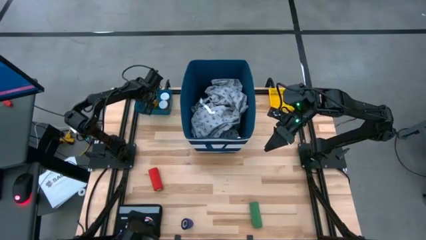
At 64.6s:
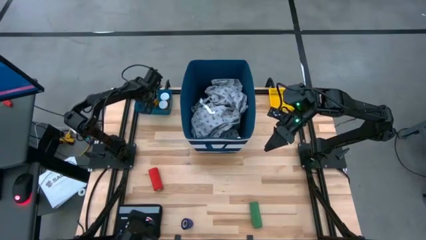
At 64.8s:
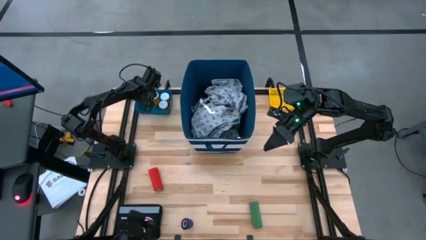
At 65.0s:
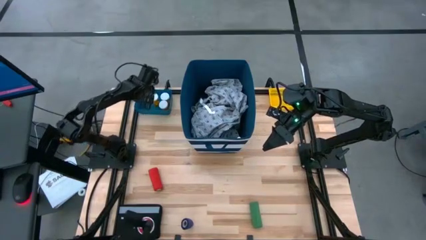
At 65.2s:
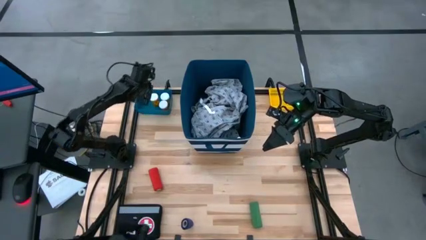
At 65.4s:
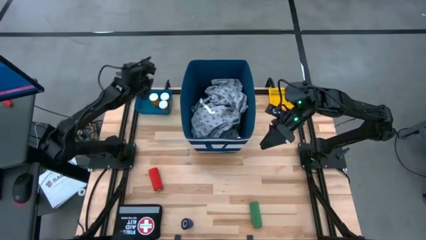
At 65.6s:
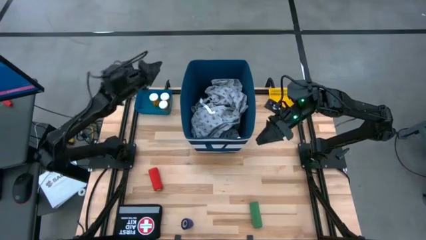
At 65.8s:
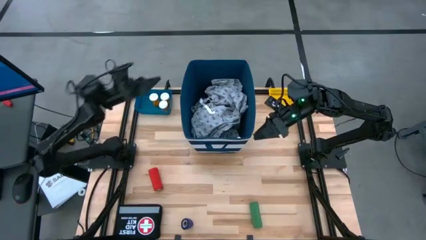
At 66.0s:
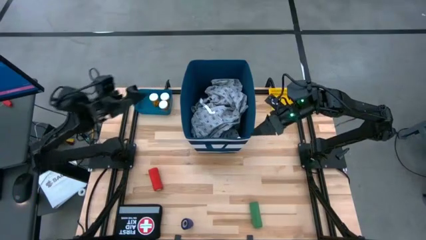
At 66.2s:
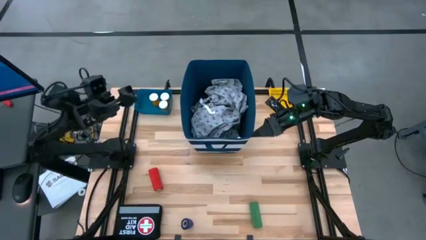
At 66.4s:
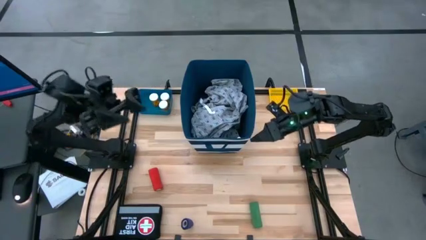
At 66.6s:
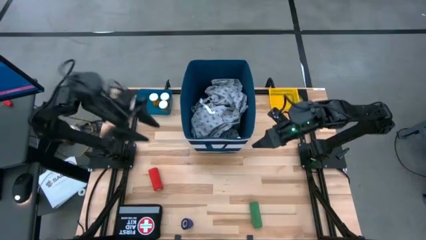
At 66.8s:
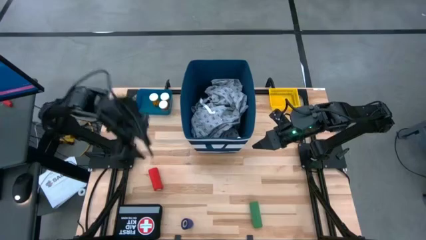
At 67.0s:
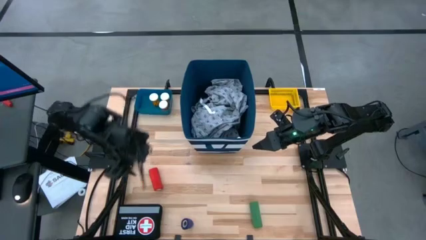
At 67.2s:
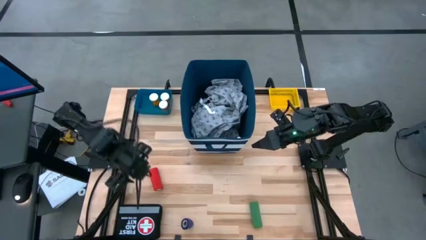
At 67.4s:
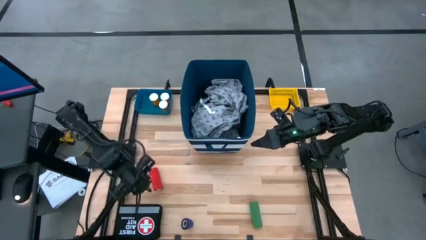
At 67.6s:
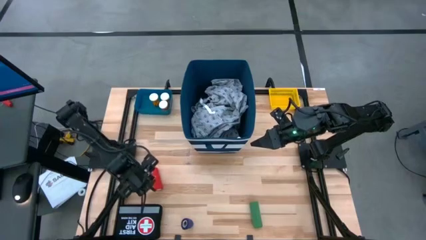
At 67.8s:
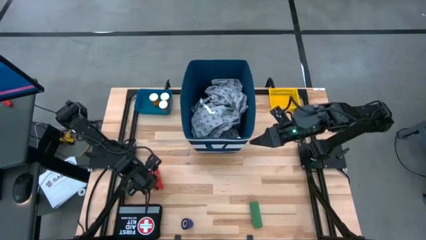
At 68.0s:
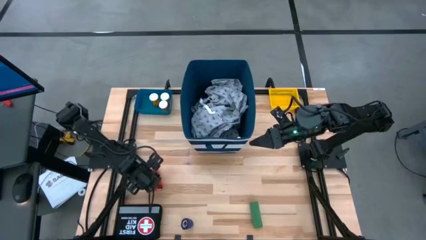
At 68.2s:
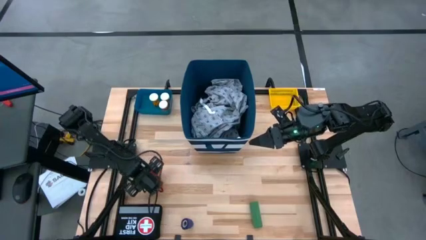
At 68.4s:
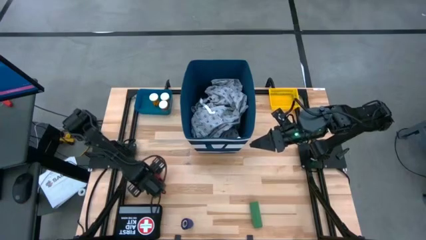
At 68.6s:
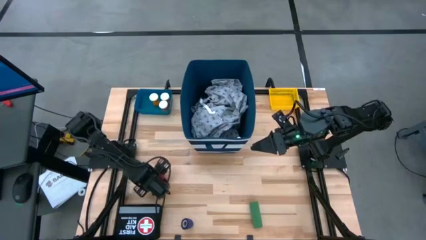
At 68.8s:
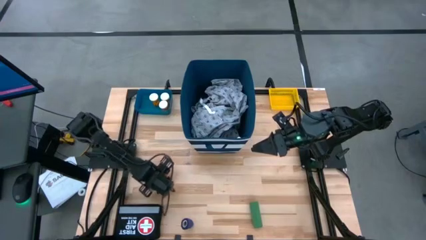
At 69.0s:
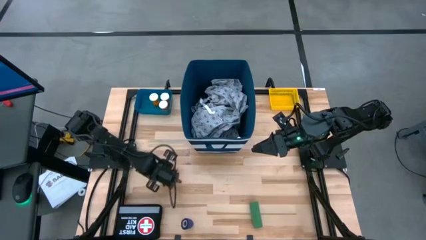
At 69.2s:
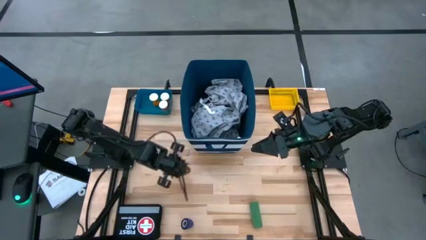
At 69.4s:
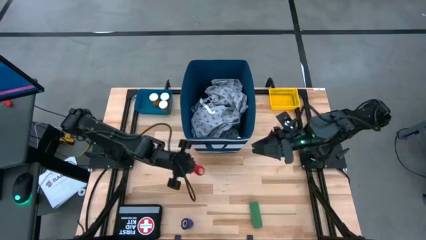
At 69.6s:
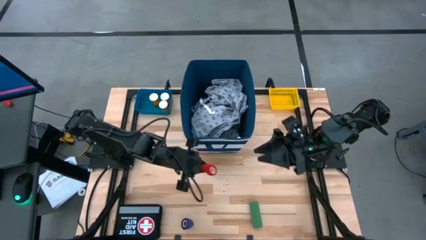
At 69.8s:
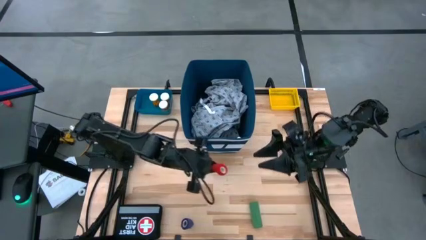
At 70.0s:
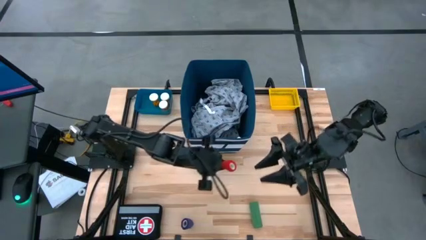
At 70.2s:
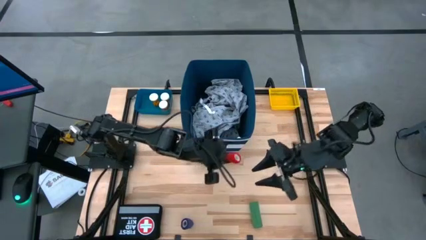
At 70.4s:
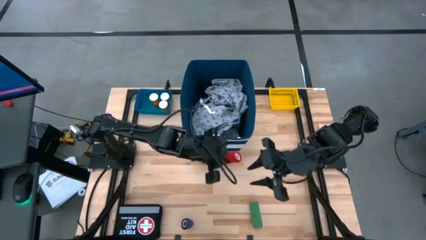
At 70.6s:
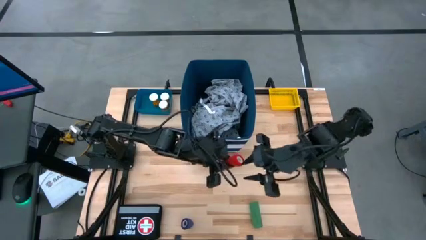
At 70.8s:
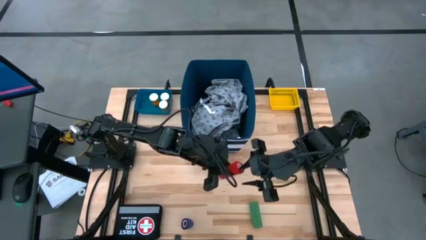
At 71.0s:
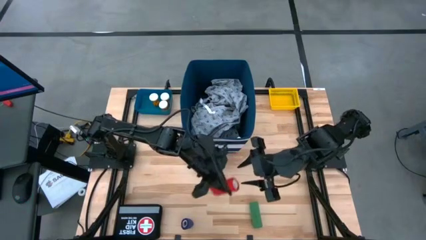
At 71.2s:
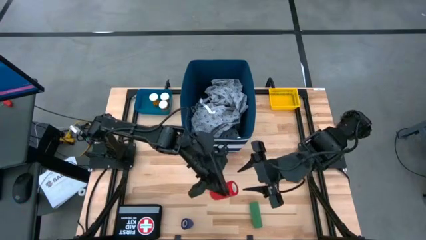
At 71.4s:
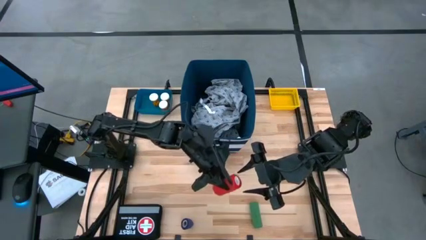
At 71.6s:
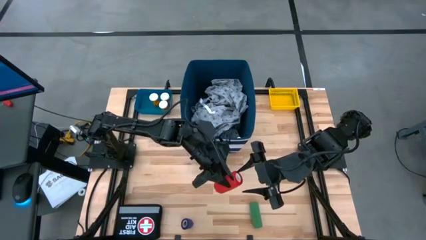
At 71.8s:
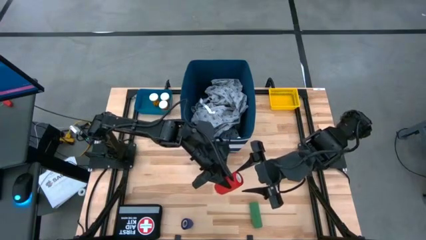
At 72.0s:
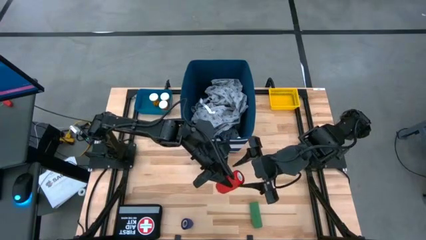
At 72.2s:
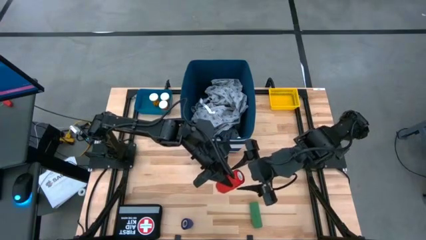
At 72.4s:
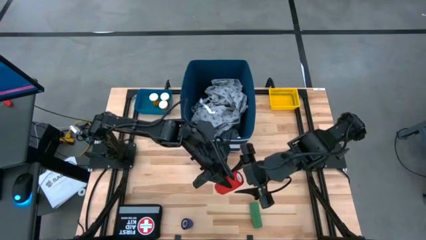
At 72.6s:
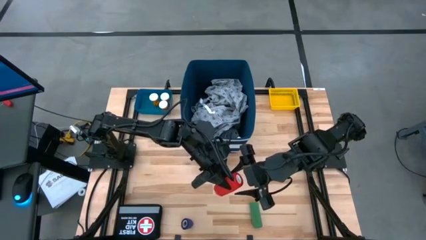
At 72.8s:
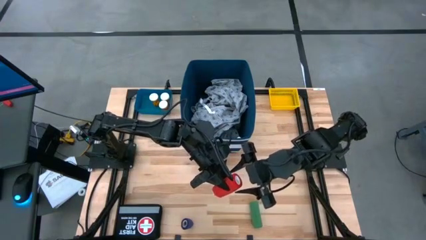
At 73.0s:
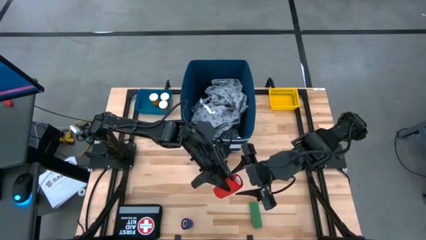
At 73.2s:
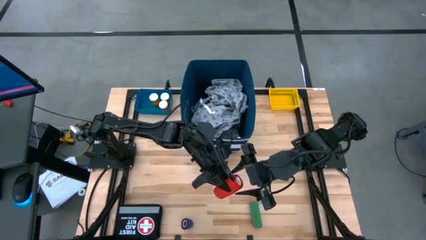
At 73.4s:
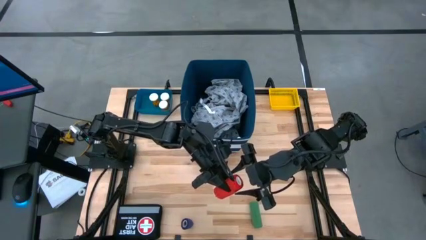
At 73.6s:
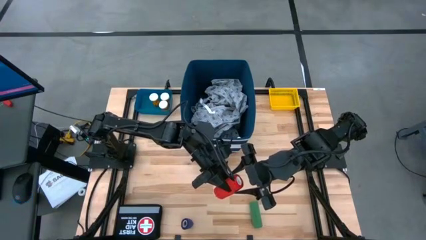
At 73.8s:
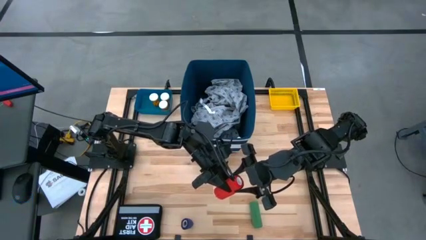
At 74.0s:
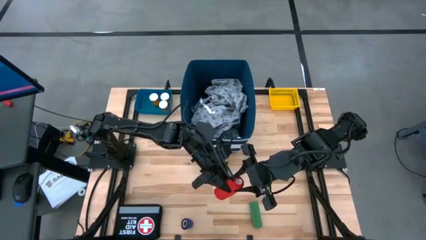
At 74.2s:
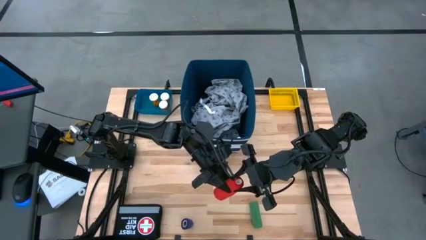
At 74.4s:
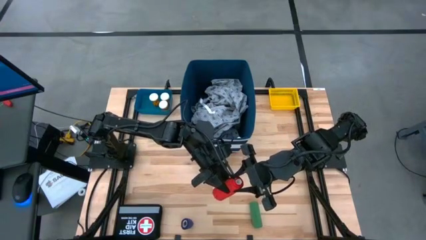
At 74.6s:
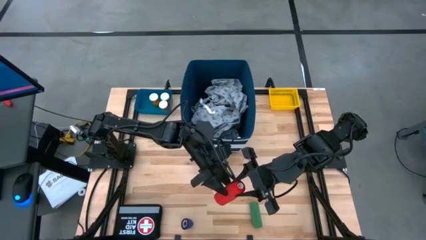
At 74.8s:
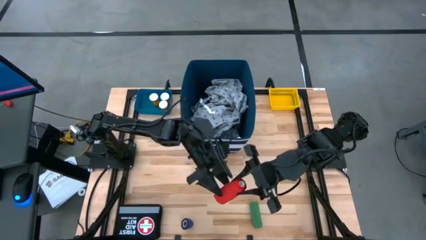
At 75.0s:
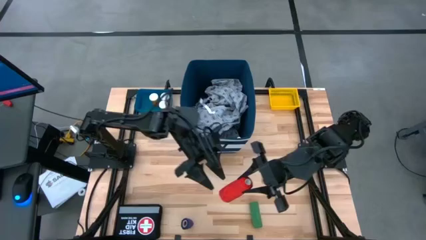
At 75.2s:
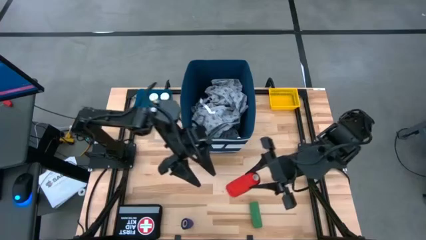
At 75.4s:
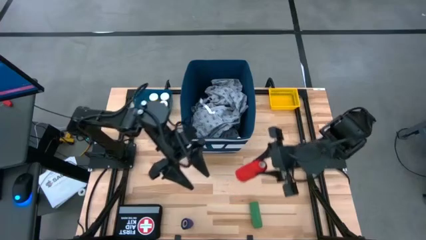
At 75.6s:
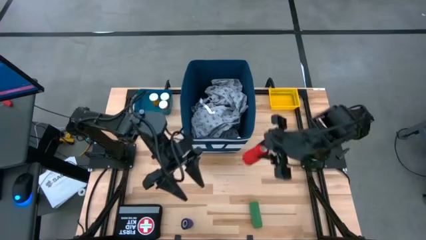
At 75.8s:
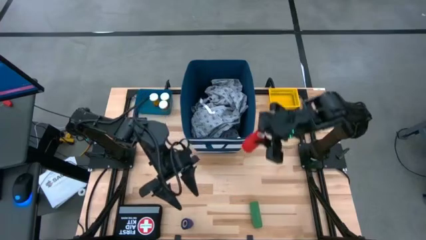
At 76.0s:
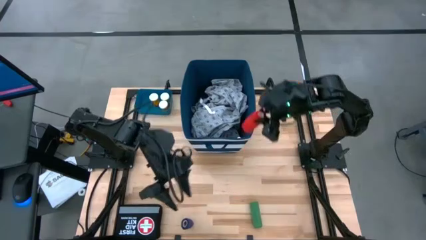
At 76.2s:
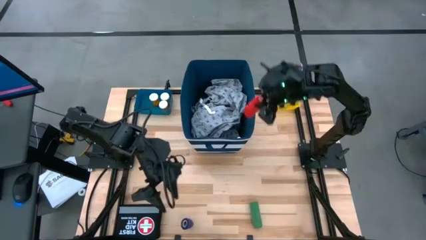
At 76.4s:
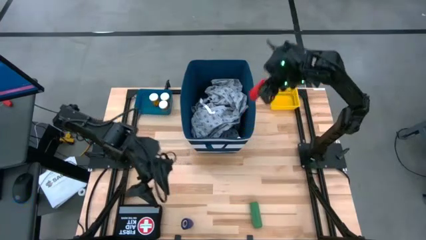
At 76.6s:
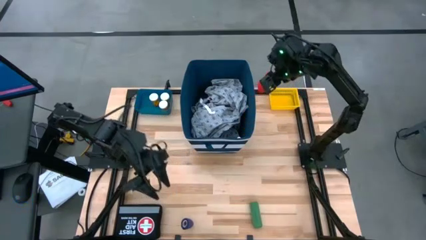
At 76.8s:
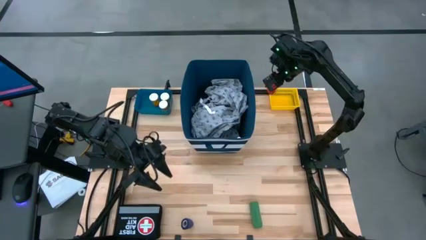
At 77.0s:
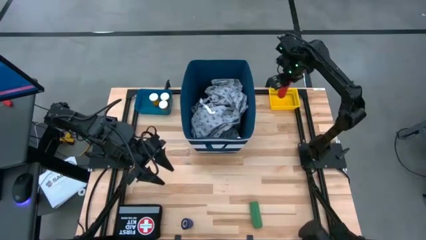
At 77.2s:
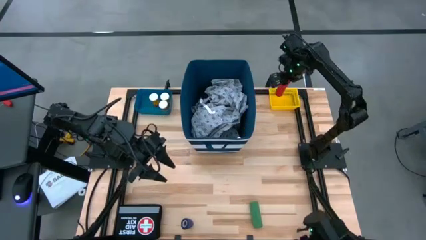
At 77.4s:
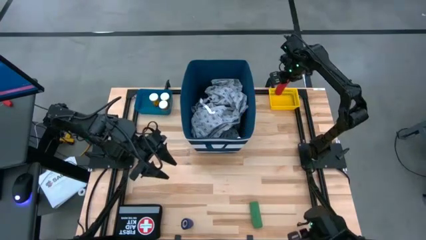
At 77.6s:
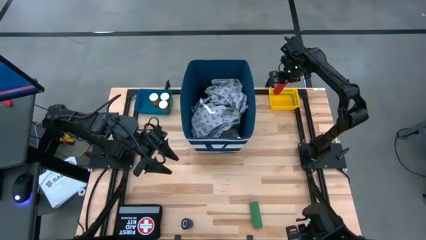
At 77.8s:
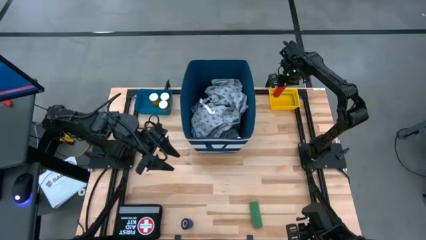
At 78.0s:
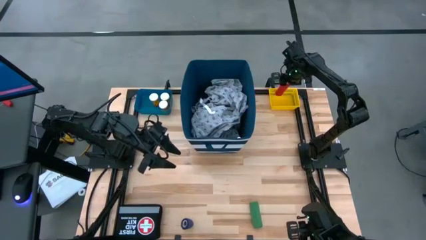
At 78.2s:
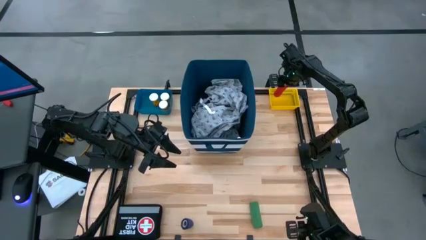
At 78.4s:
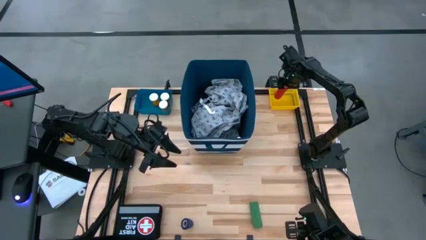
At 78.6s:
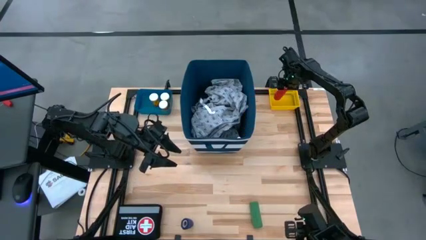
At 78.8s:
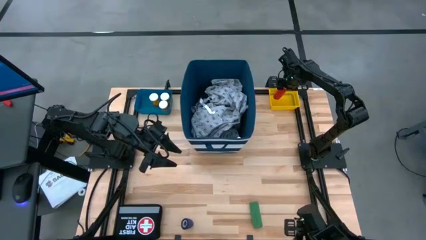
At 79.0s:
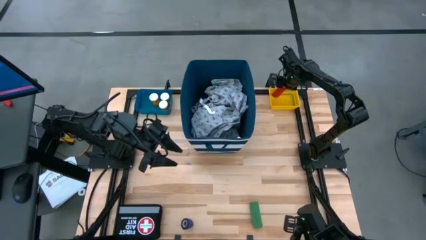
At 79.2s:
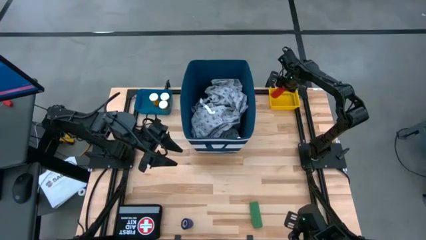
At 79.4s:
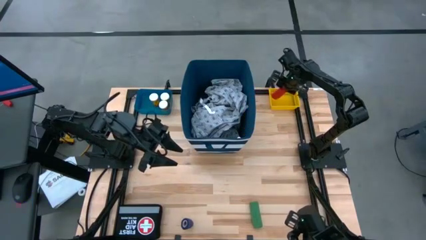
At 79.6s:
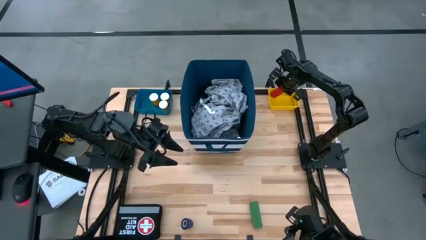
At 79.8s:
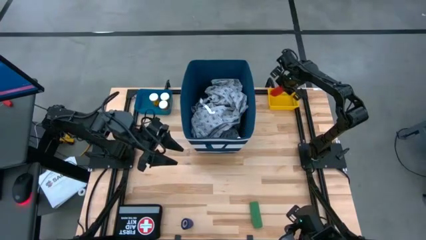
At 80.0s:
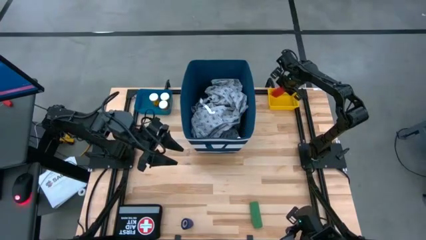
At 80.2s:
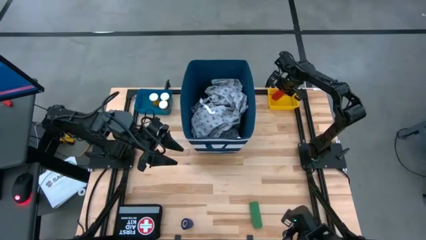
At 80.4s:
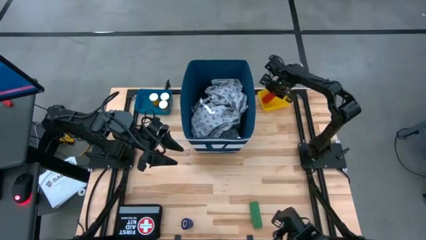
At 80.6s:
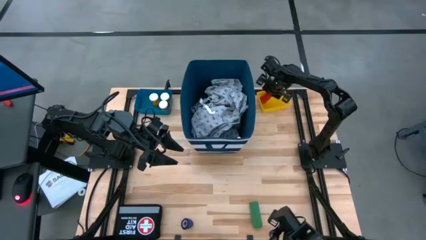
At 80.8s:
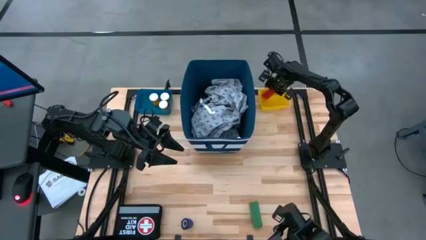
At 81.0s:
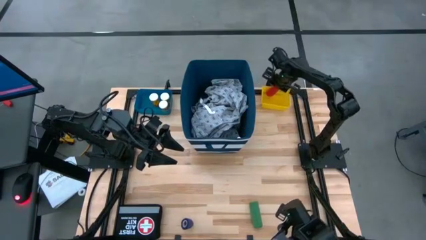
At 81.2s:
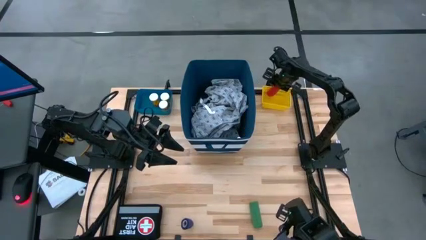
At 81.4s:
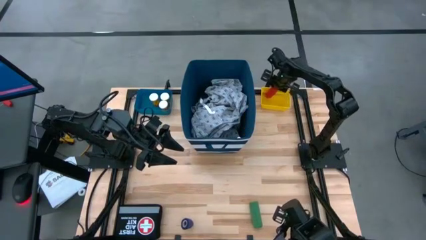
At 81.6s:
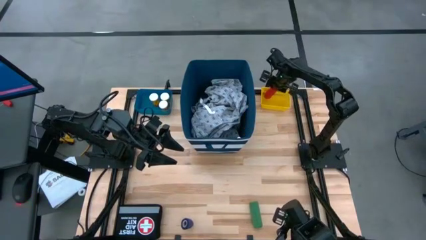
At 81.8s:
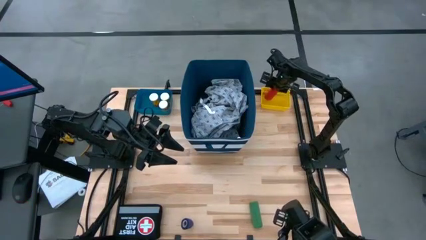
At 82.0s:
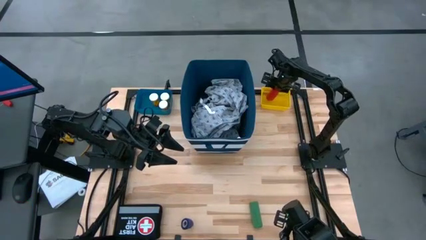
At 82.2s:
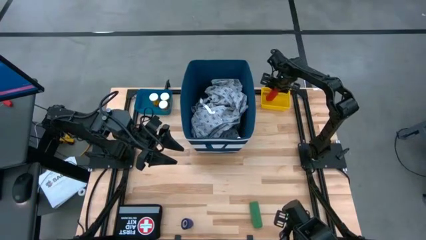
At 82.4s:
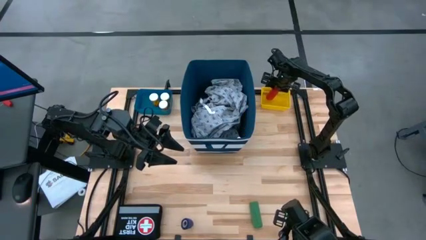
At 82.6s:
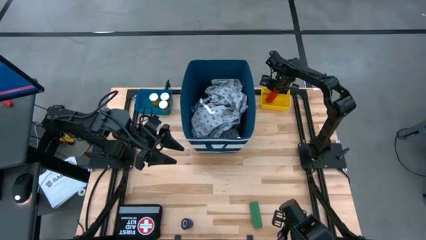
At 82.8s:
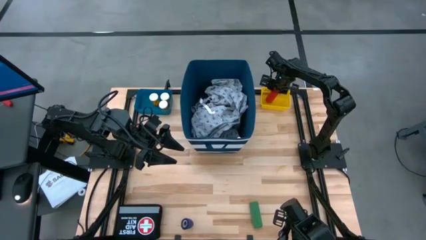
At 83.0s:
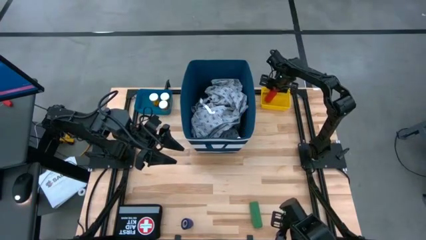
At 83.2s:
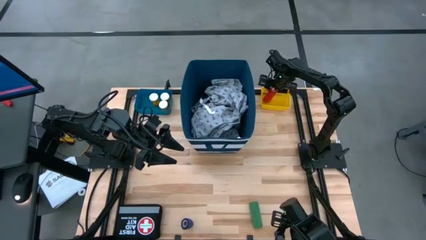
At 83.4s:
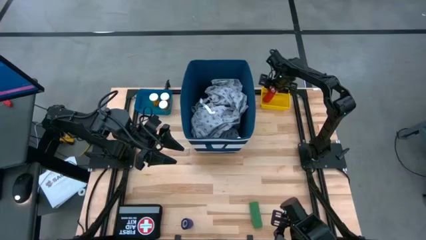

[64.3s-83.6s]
Task: Pick & place medical supplies in basket/bin
Put the red bandage into the yellow bin
